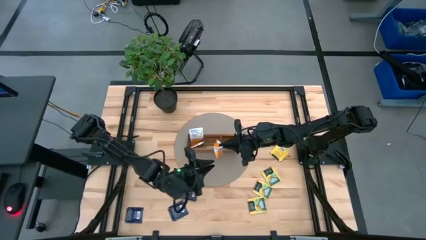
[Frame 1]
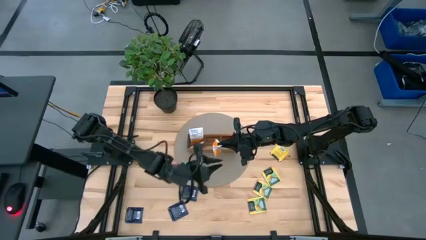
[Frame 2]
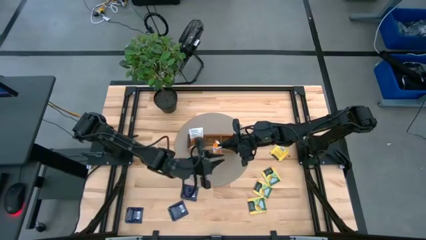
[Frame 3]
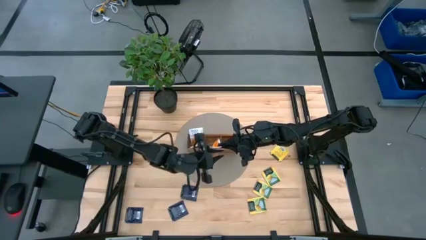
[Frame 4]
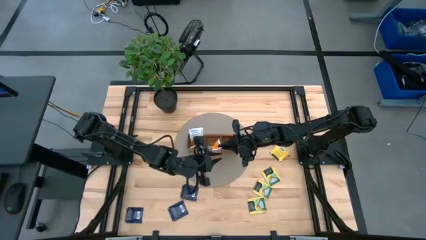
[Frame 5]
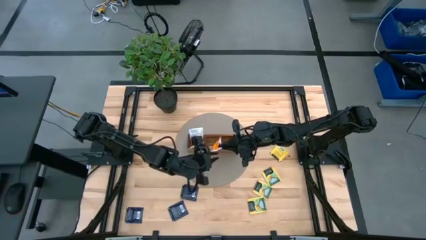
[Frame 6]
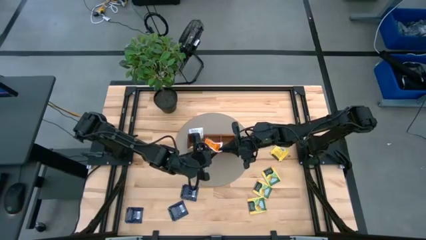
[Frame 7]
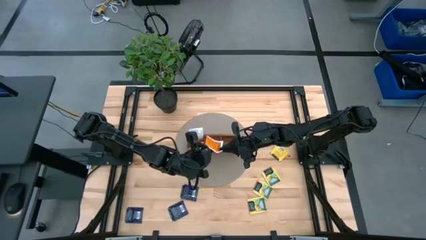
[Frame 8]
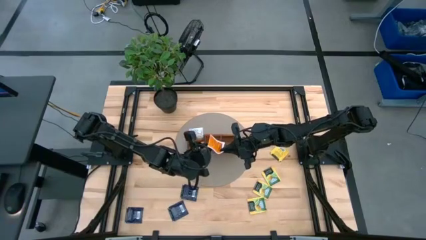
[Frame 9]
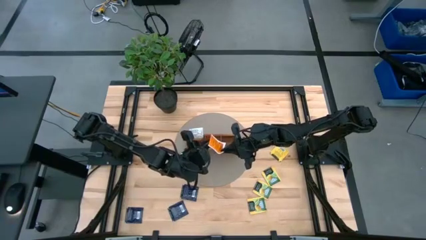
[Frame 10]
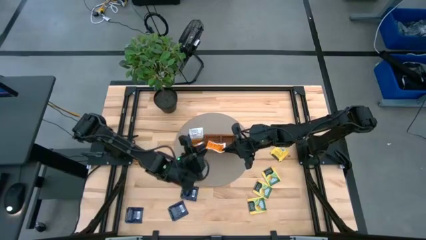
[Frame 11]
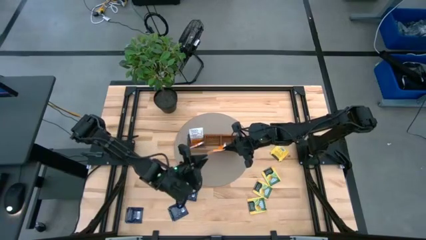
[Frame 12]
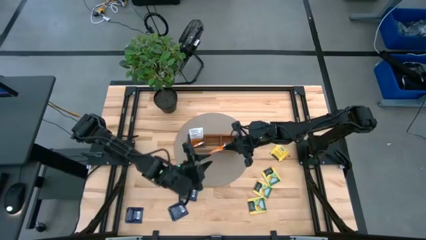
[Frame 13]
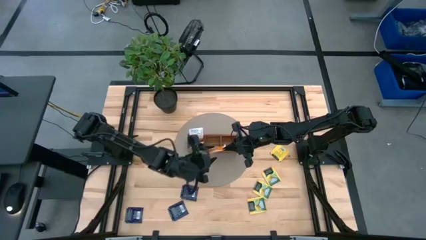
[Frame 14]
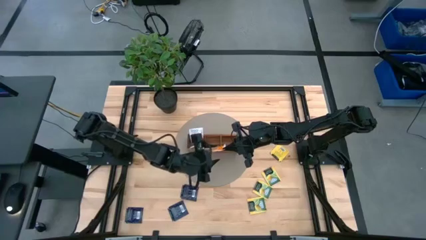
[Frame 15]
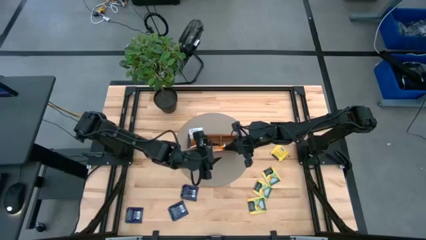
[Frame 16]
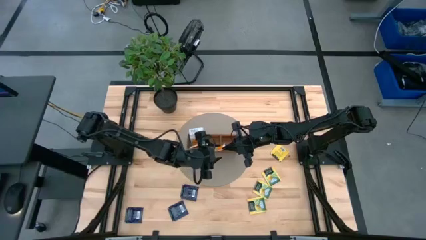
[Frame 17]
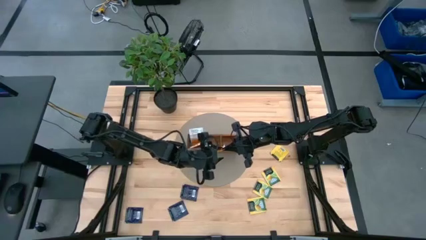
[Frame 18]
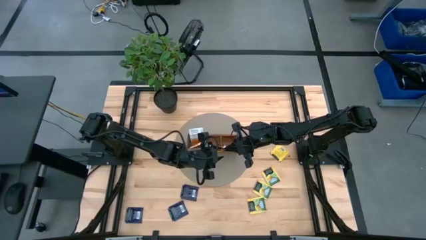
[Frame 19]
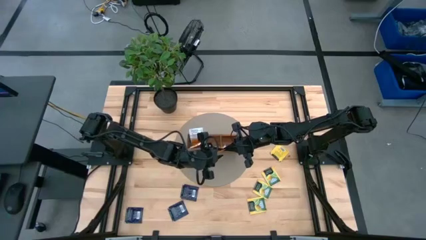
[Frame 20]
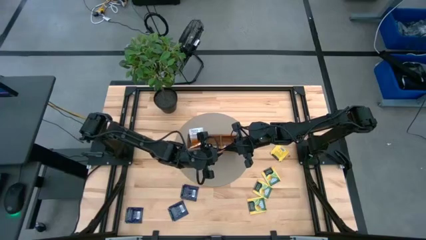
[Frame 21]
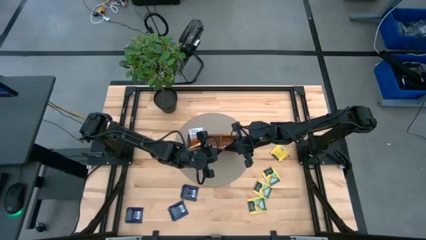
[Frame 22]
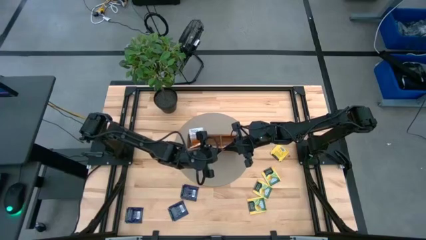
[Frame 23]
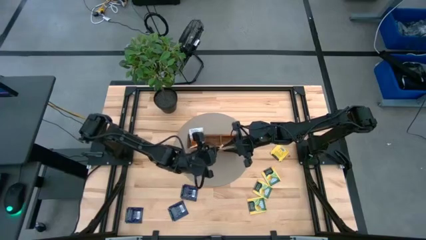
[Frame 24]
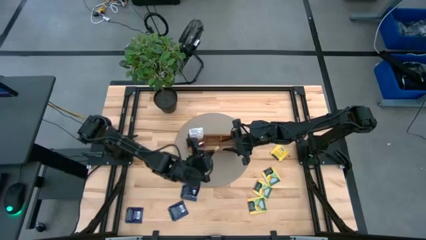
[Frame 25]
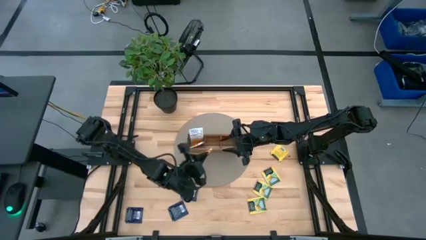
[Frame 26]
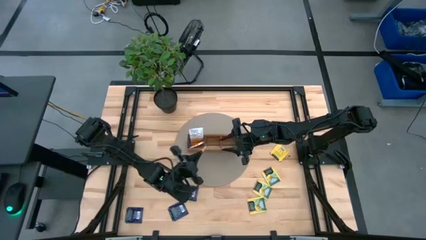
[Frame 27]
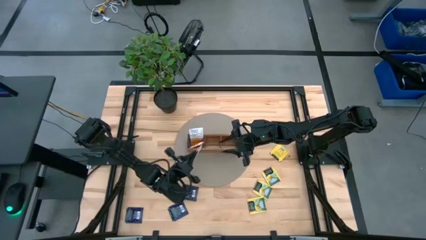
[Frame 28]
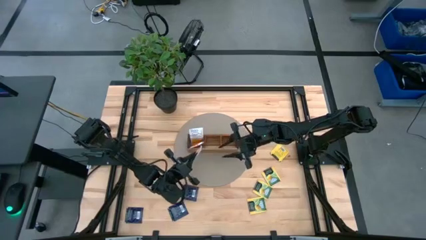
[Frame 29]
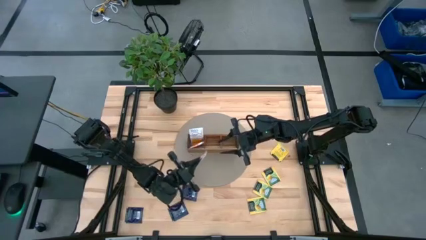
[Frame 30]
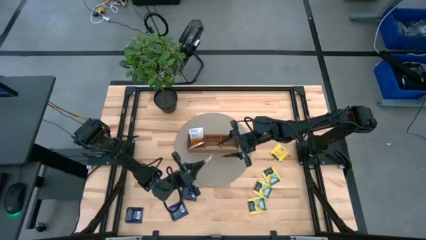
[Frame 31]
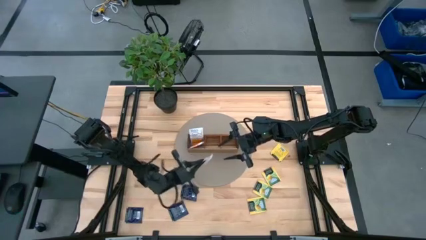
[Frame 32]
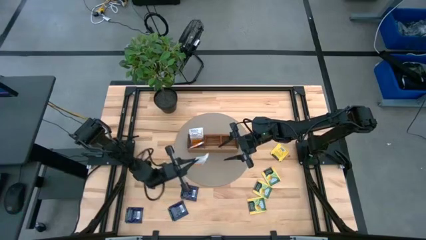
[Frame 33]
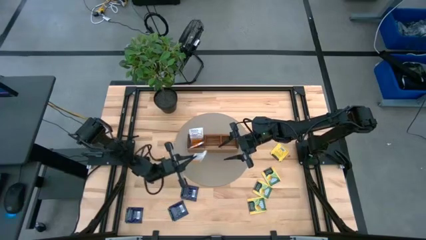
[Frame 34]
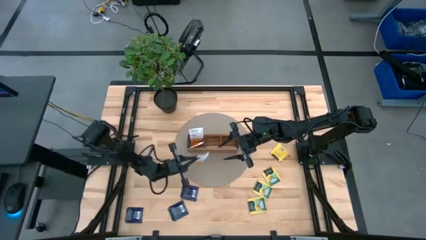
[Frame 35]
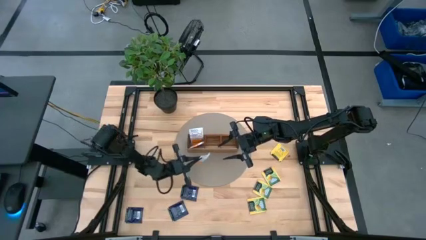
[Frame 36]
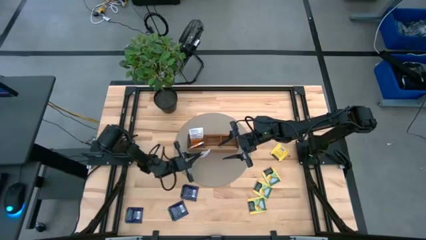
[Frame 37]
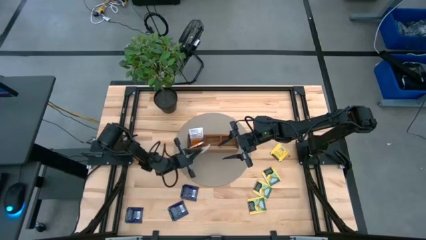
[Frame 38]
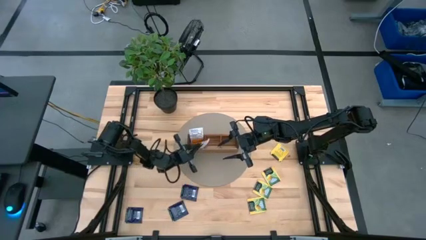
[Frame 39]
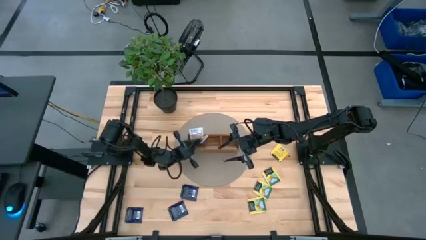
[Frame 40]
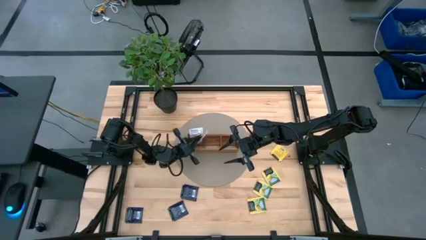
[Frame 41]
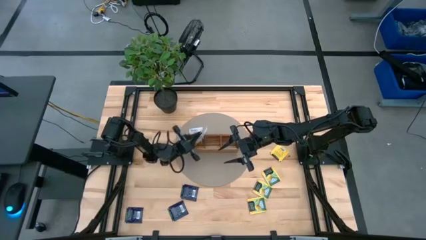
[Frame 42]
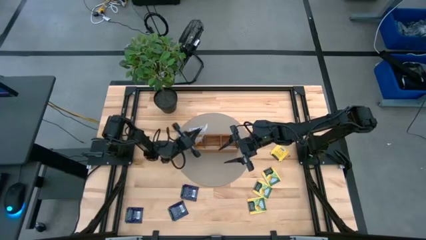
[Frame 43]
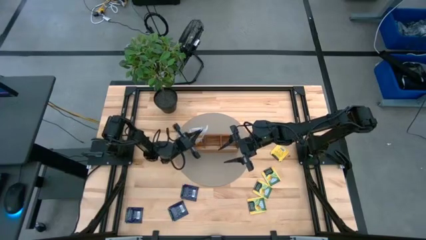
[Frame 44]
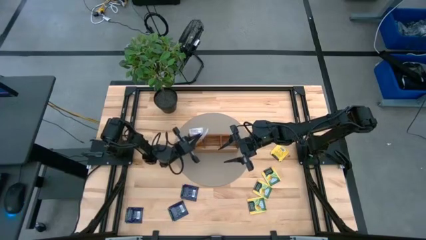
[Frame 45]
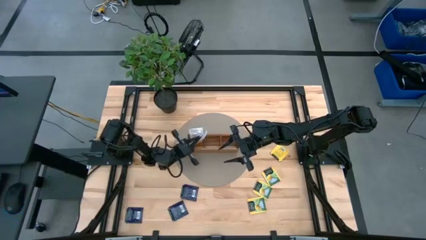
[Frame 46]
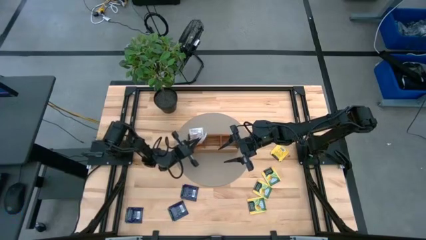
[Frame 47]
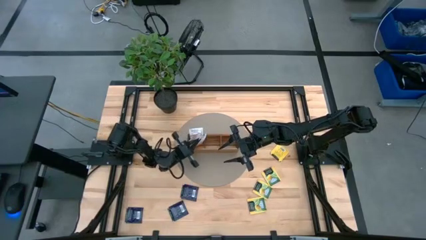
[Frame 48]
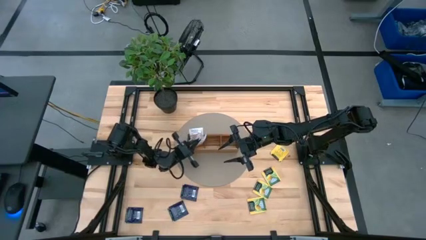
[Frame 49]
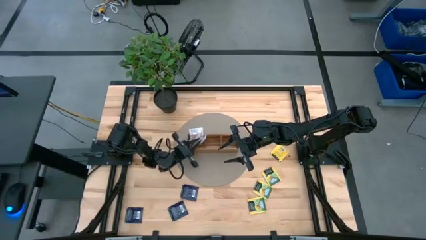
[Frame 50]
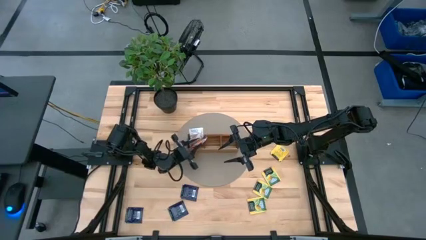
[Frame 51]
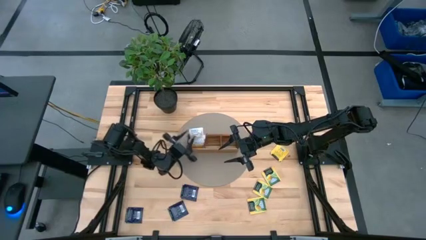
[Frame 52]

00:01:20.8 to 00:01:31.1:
Task: Pick & Place Tea
Put the orange tea bag into the left section of the wooden organizer

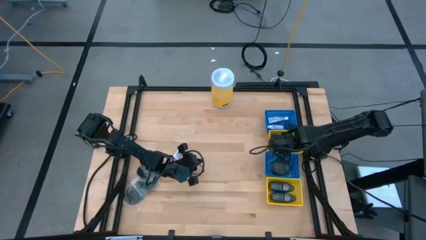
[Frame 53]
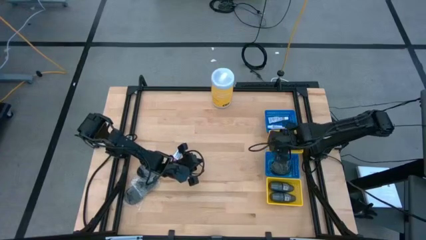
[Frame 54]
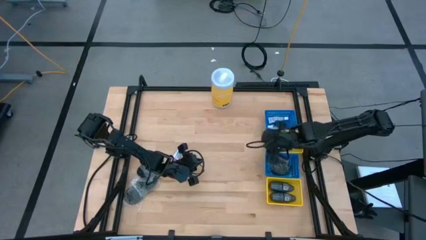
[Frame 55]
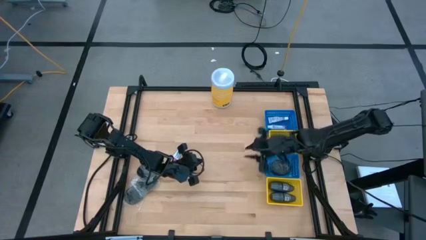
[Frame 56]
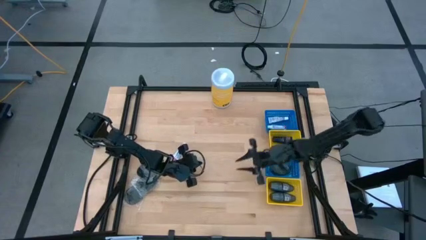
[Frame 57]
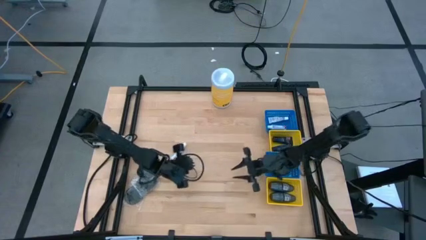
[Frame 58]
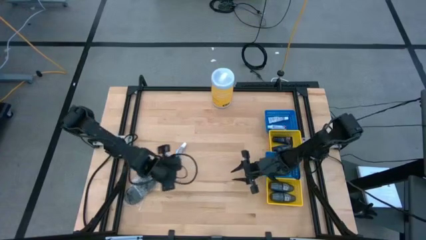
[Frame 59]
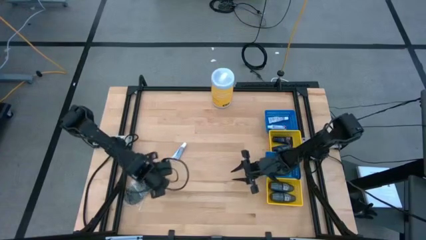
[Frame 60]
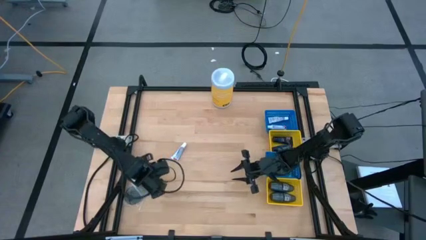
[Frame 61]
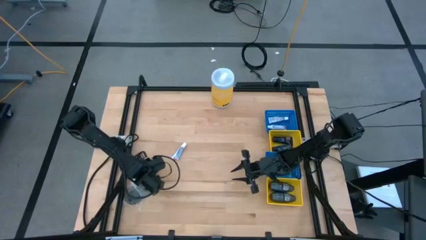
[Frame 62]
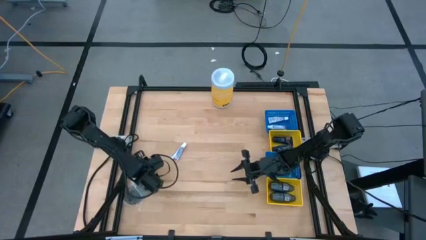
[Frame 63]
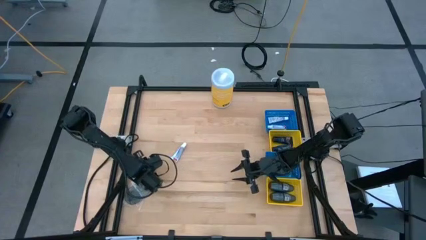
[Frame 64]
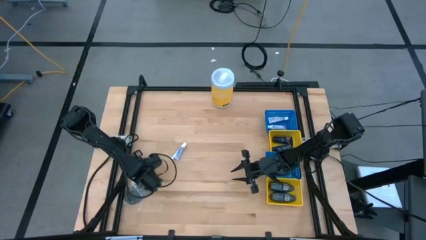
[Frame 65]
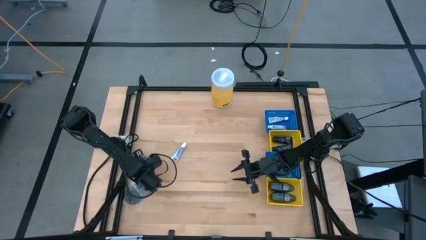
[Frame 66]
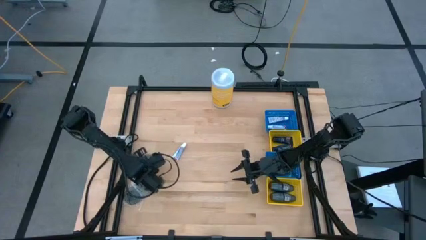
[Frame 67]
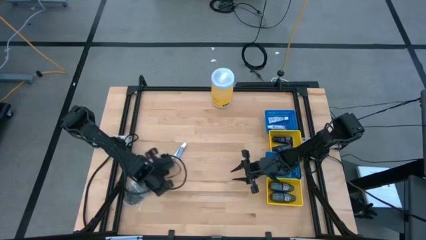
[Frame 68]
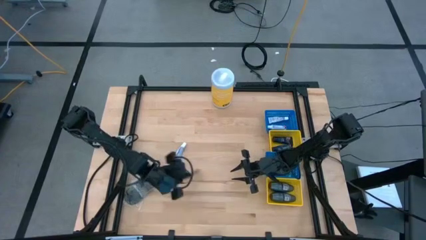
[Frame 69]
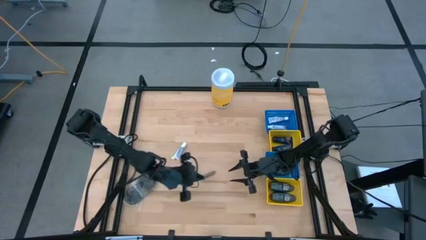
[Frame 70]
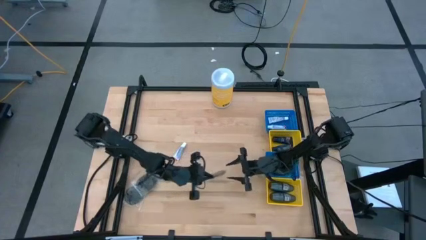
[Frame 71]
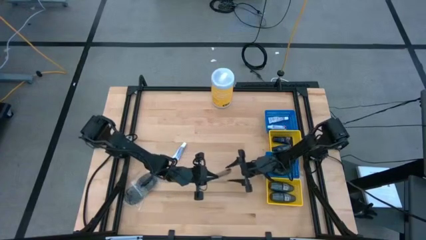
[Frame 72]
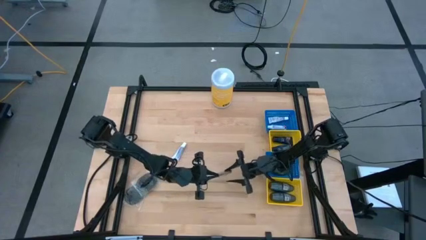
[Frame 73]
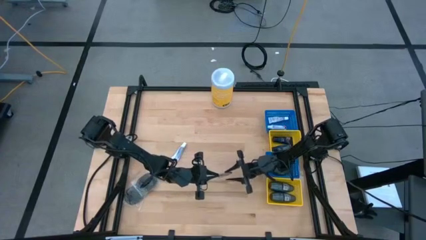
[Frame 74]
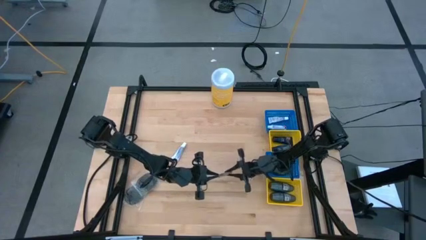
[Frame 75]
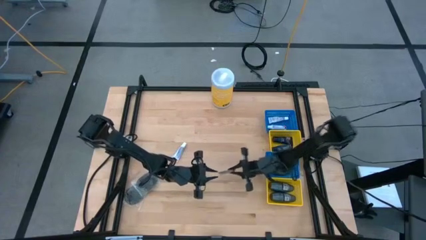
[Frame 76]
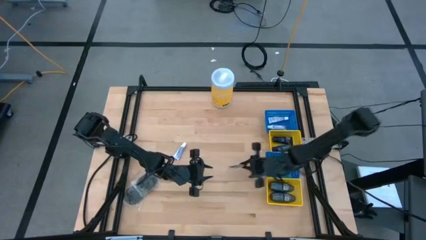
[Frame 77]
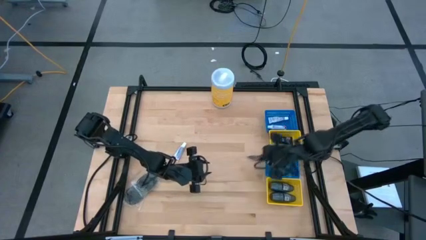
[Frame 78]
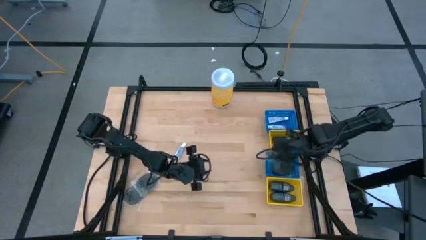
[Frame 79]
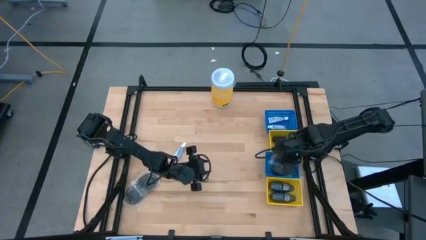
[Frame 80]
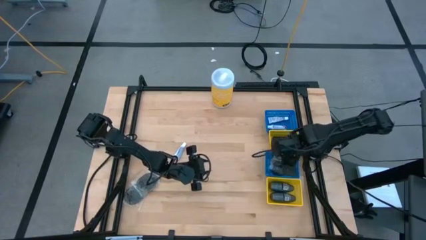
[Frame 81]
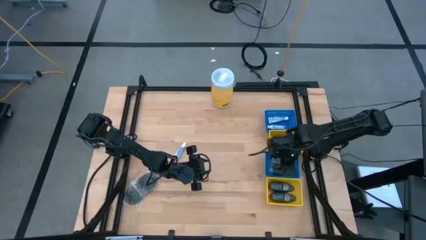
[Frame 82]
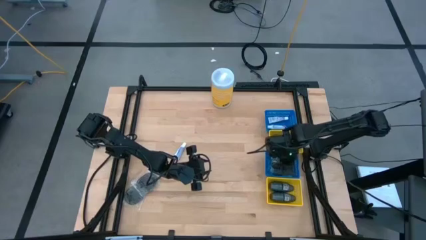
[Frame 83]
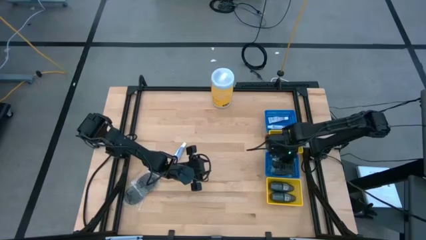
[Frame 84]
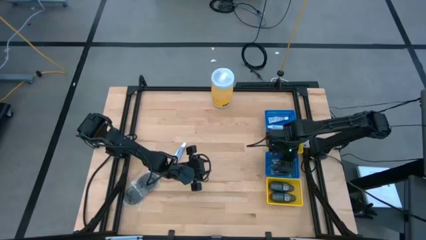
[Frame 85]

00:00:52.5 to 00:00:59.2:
Task: Pick & Place Travel size toiletries
Put the black hairbrush into the bottom blue bin

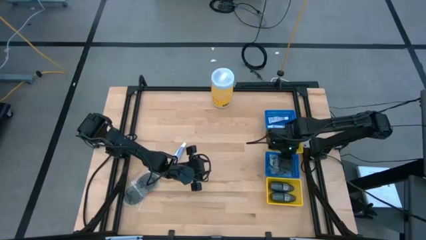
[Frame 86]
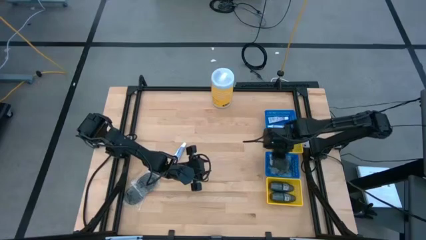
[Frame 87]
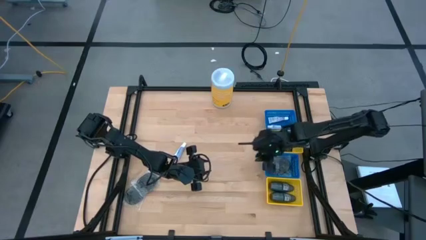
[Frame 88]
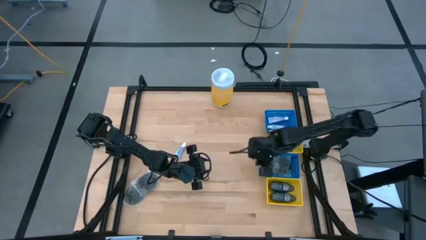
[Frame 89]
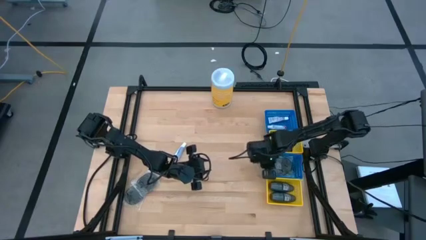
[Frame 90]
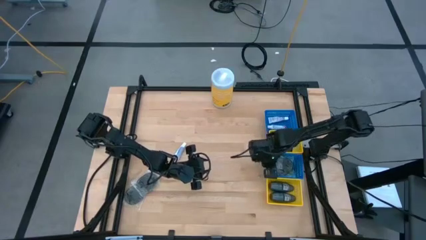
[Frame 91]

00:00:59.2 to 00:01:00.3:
Adjust the bottom blue bin
